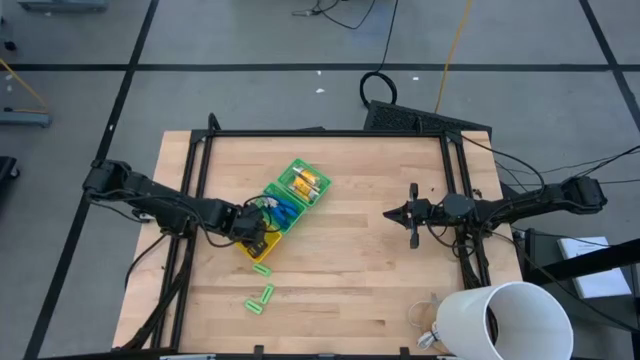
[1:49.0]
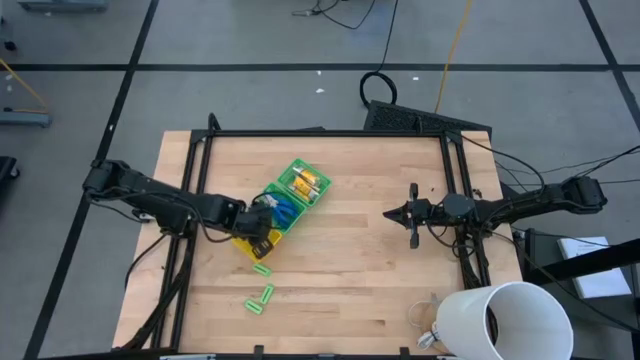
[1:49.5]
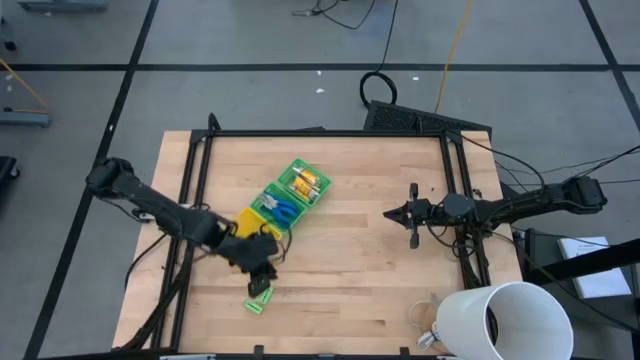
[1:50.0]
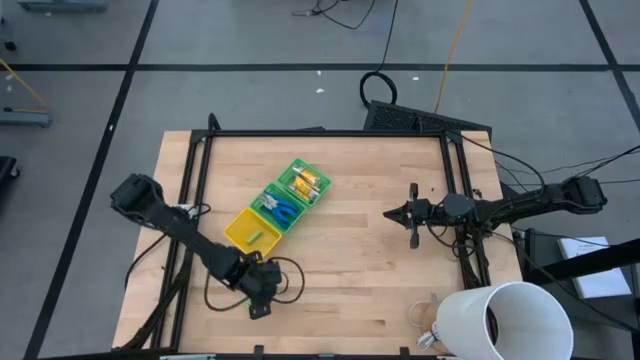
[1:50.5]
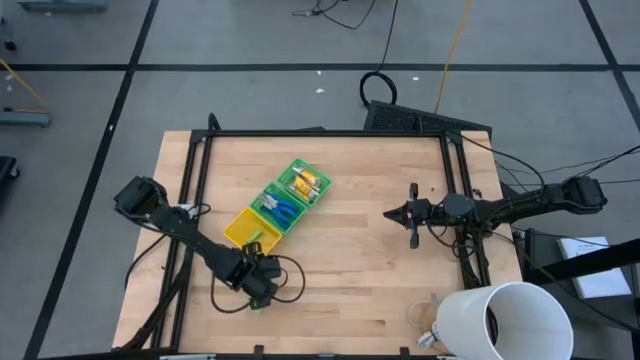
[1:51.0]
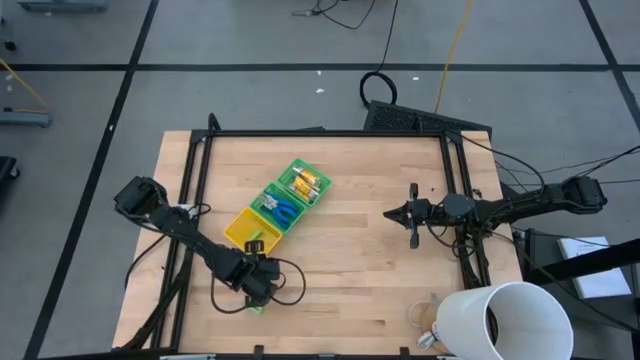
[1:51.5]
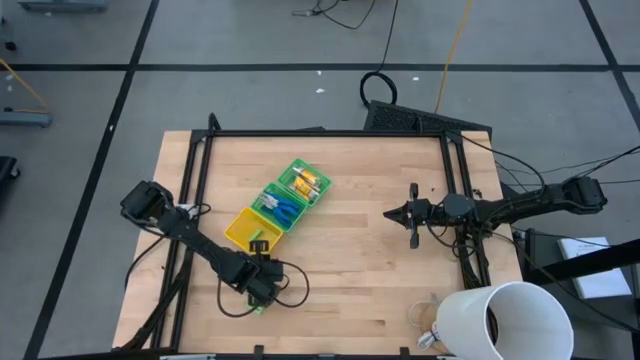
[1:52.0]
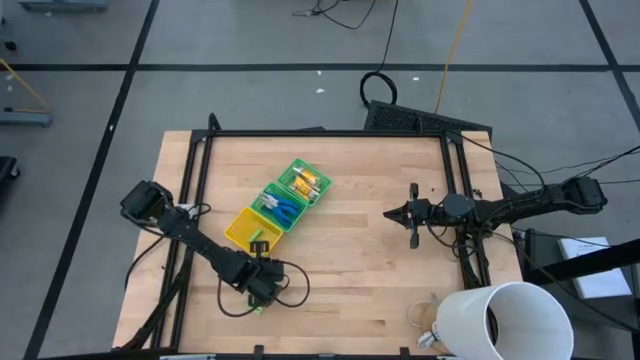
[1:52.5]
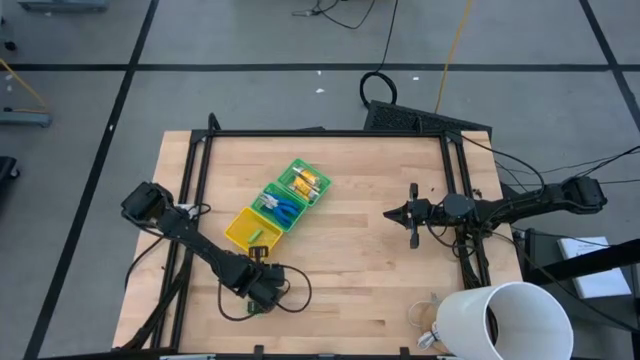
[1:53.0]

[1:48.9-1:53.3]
Task: Pick & Place School Supplies
Put the green eraser into the yellow bin

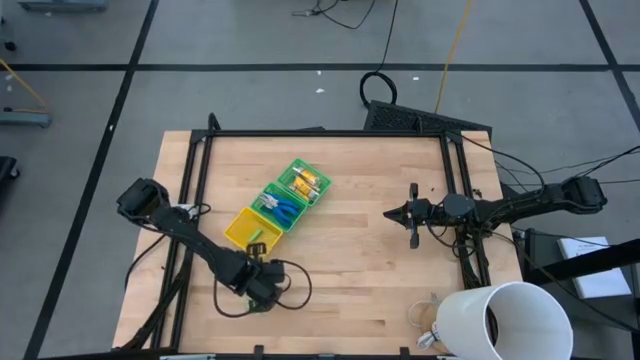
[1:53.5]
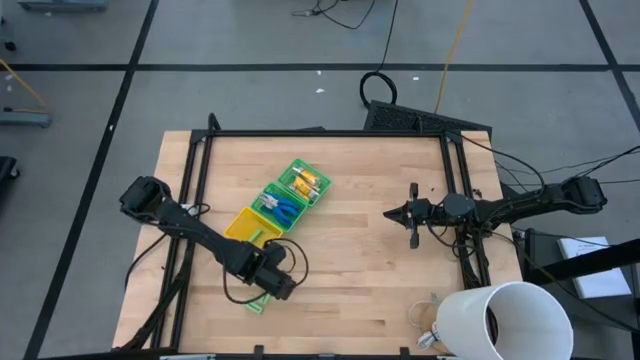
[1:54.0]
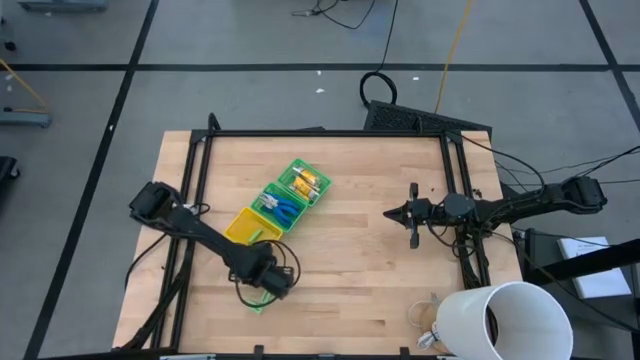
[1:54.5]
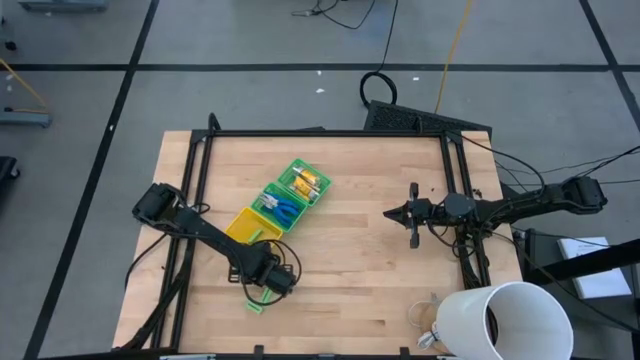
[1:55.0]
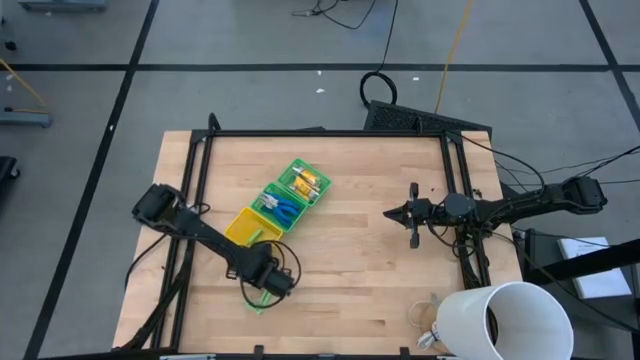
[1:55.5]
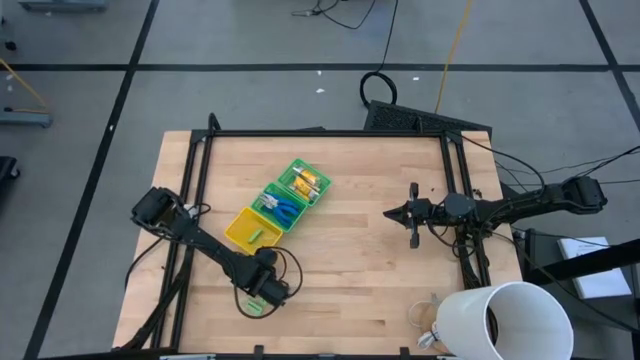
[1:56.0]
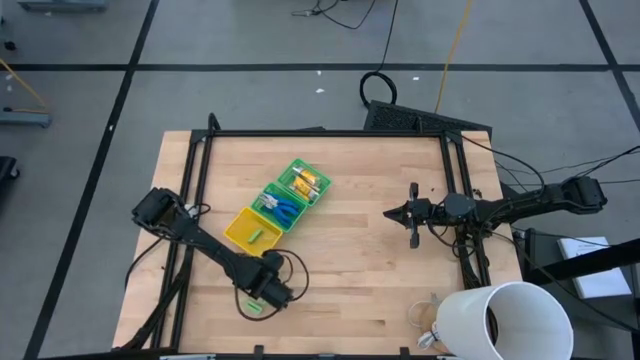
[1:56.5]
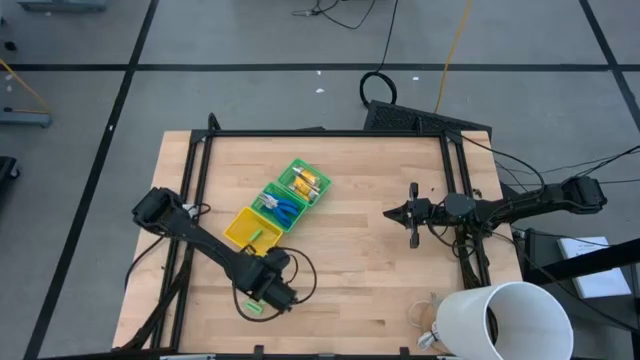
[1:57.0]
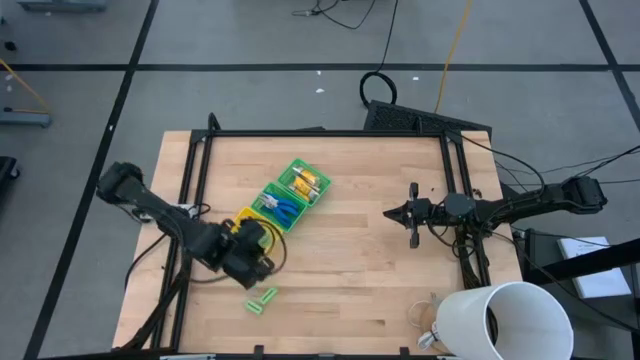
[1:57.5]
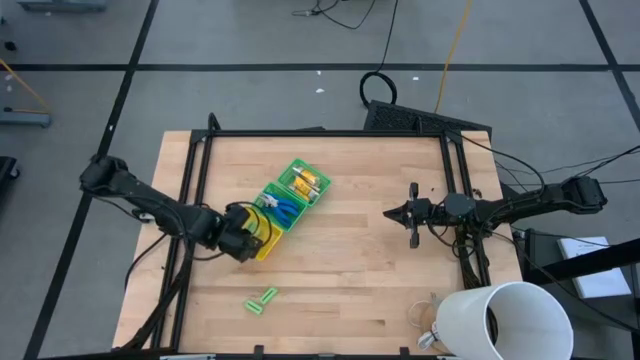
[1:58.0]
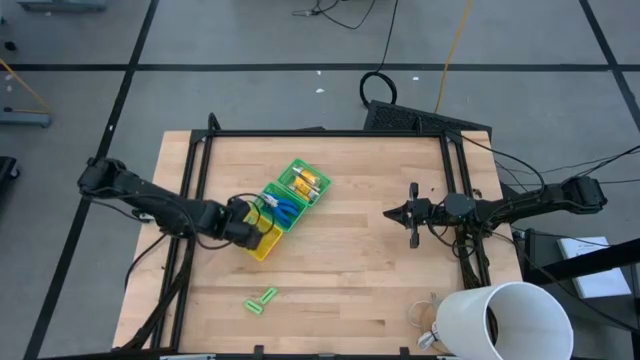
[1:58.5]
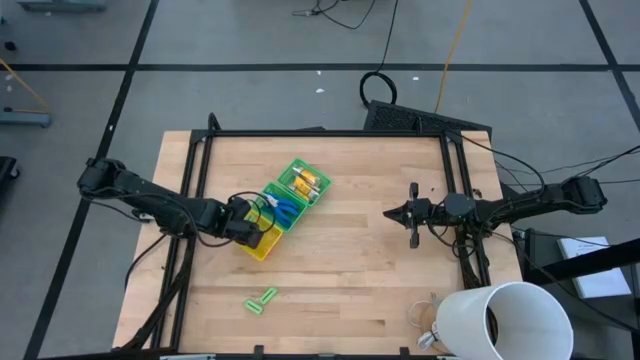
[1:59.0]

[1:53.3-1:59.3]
Put the green eraser into the yellow bin

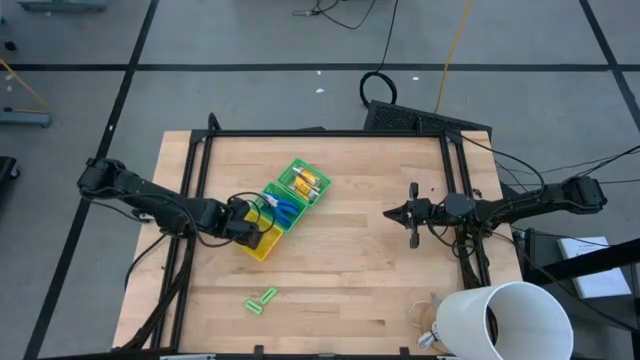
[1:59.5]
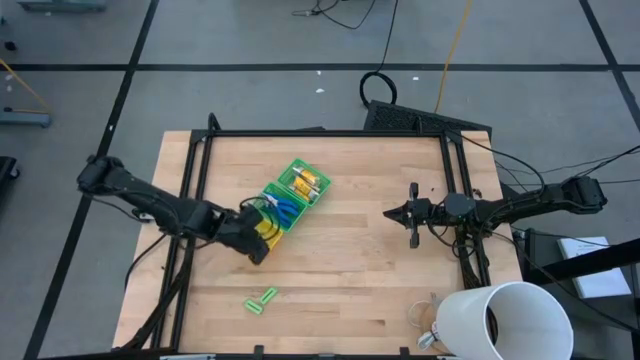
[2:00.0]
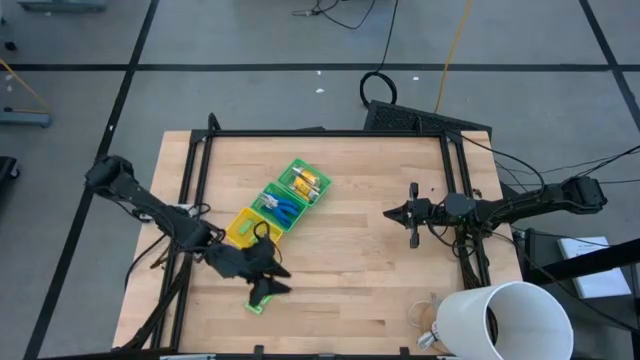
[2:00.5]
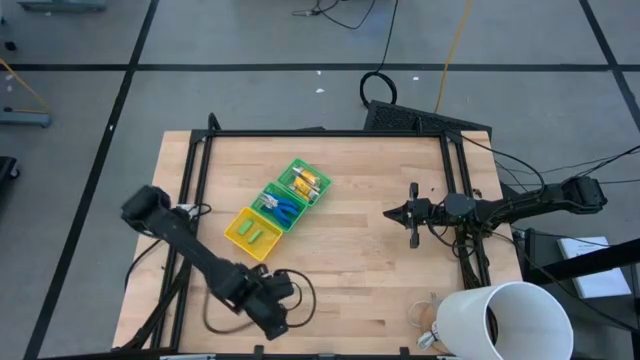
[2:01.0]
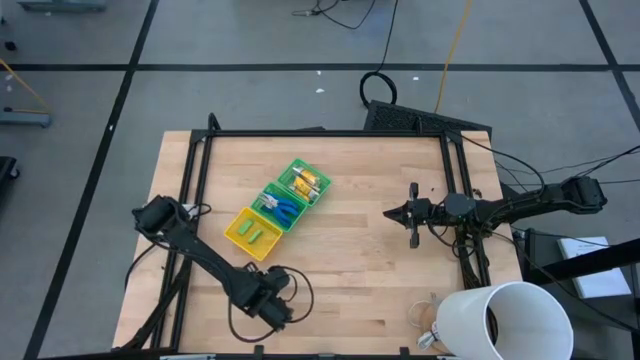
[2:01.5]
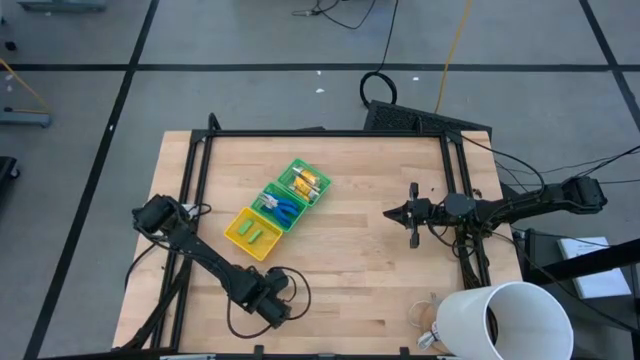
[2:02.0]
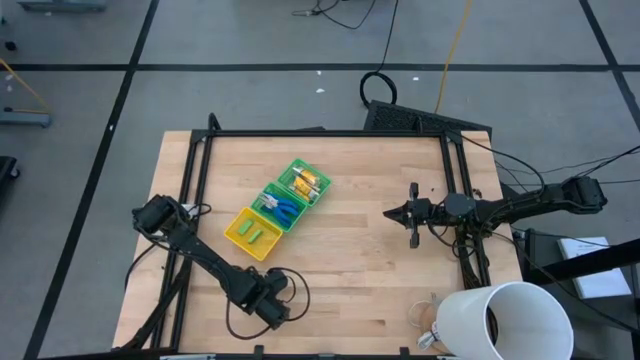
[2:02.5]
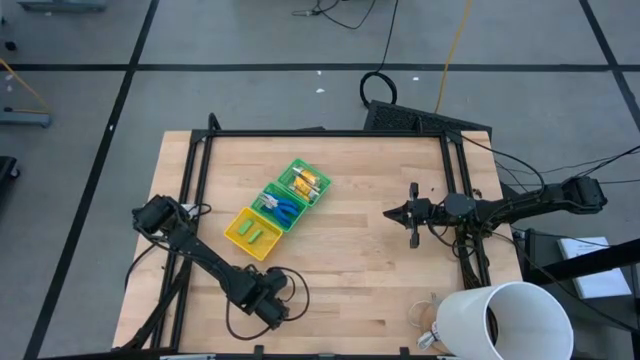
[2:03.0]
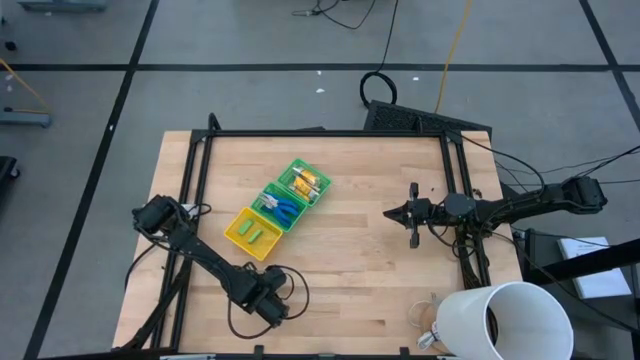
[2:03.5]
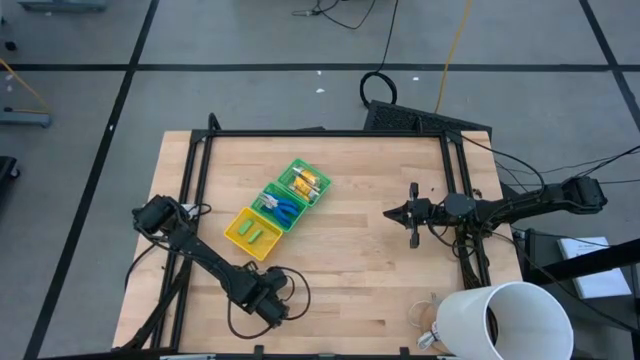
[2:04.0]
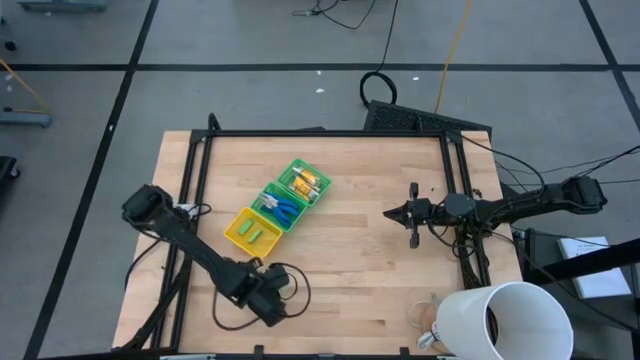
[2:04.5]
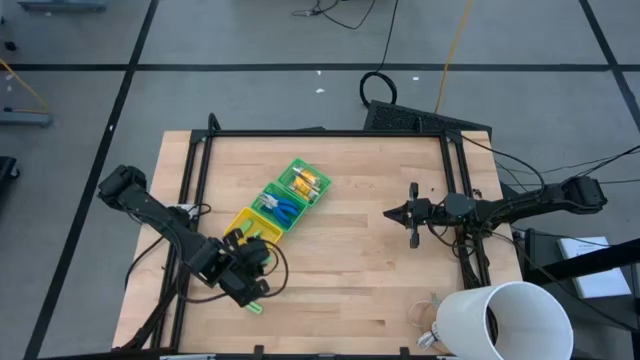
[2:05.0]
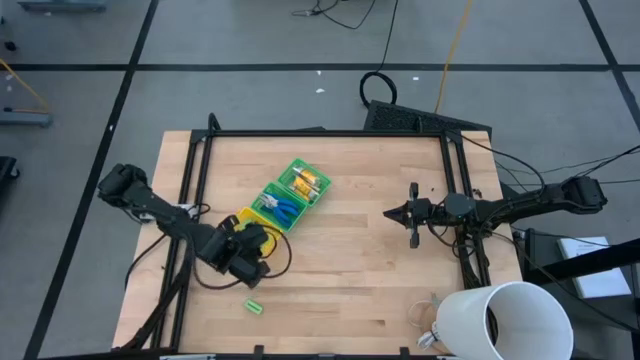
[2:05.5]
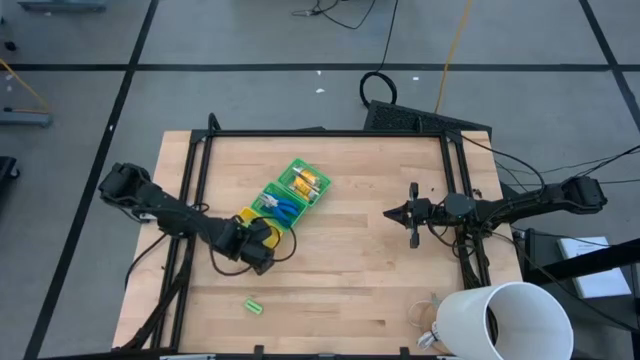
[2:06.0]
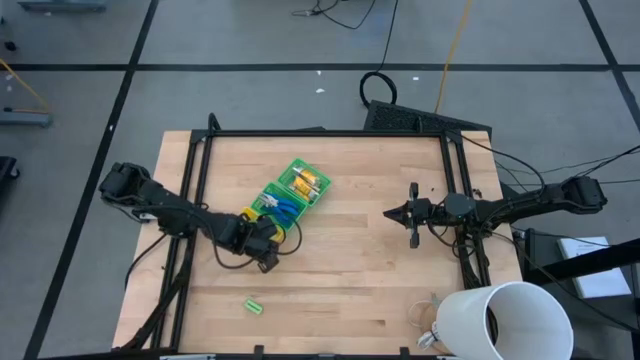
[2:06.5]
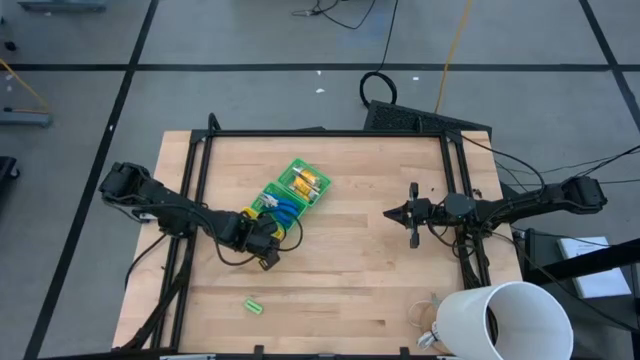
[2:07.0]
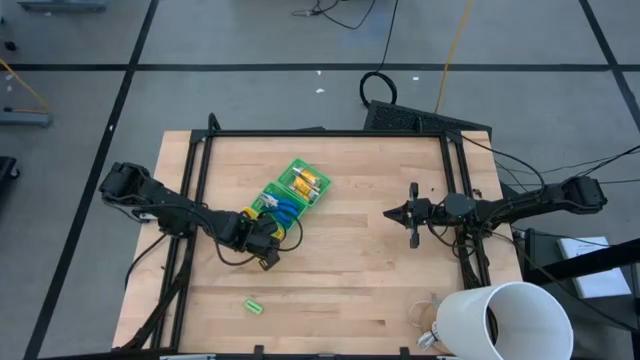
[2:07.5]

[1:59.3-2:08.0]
Put the green eraser into the yellow bin

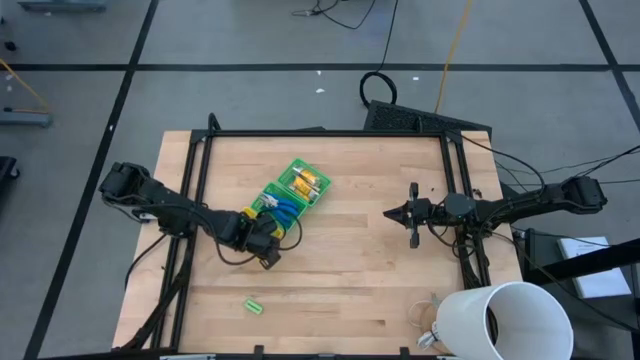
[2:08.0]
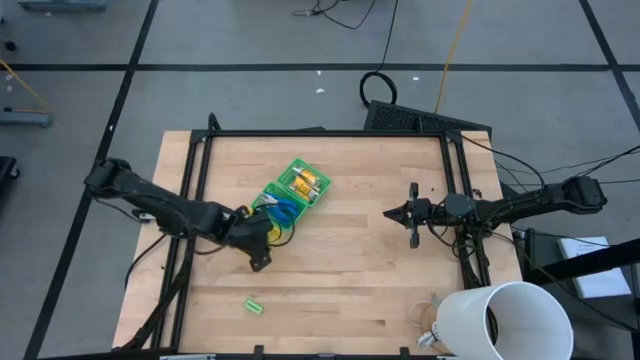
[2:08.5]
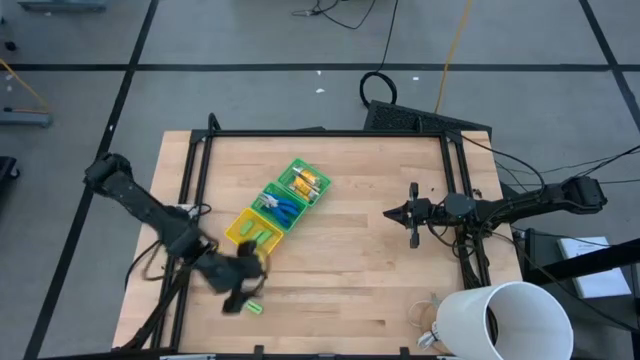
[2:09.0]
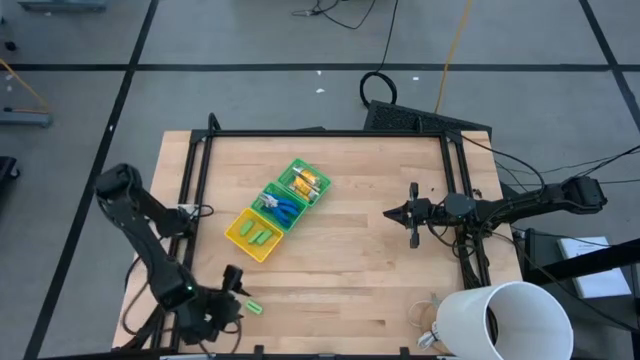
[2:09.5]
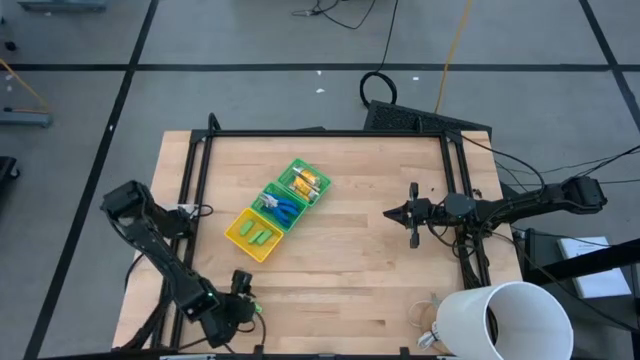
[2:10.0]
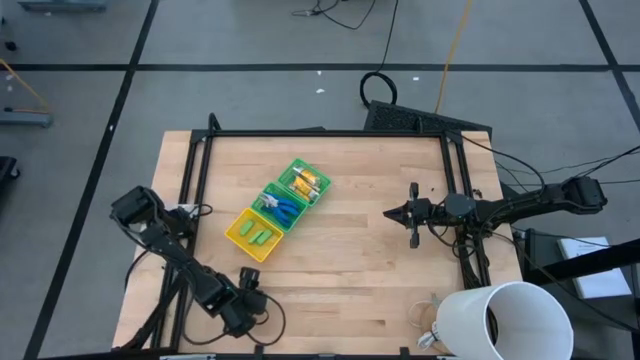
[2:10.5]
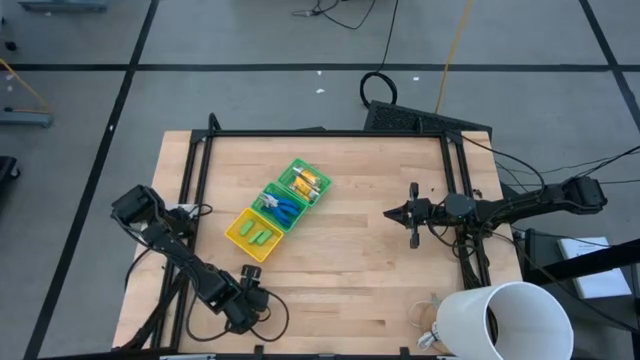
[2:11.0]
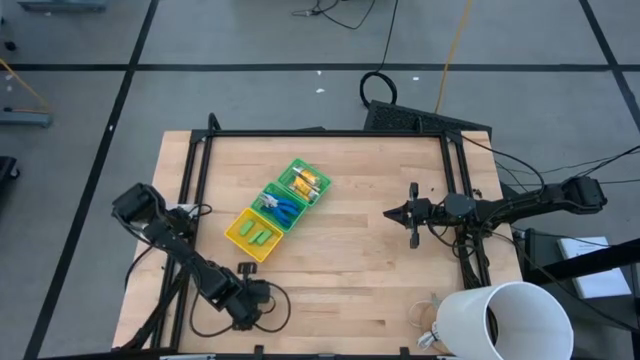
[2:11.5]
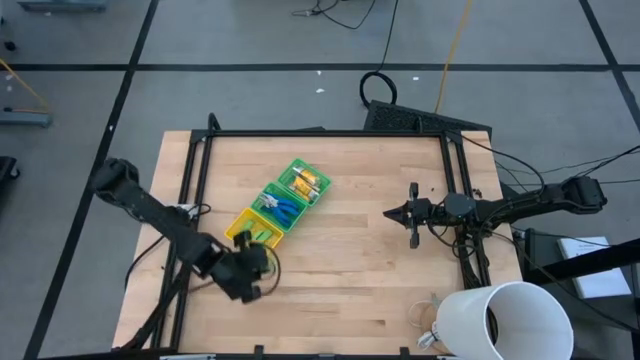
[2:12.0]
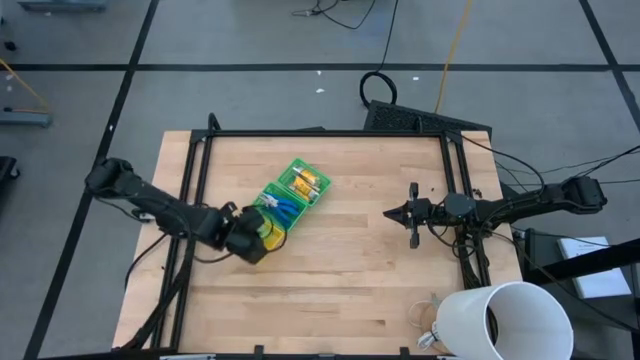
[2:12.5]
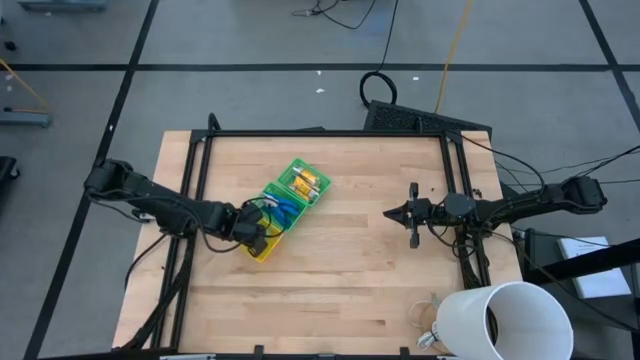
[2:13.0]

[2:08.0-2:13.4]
Put the green eraser into the yellow bin
